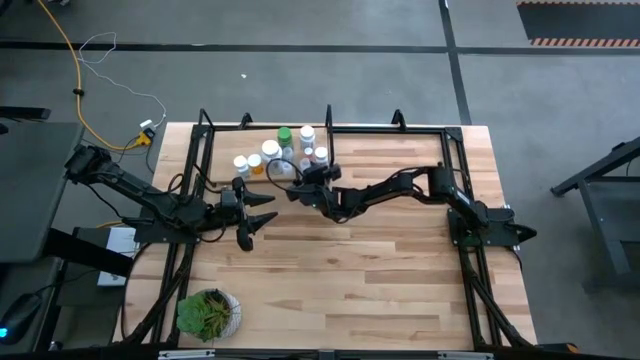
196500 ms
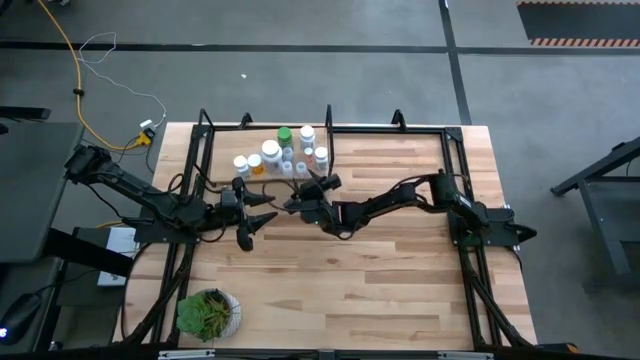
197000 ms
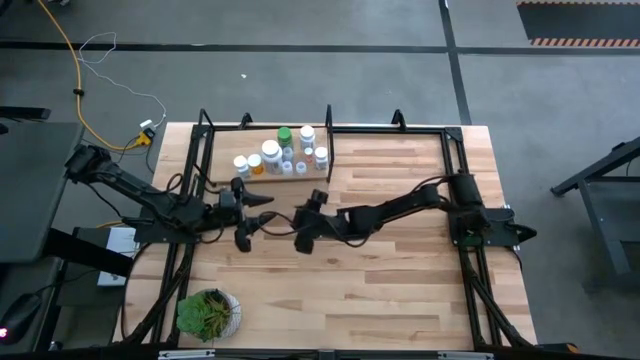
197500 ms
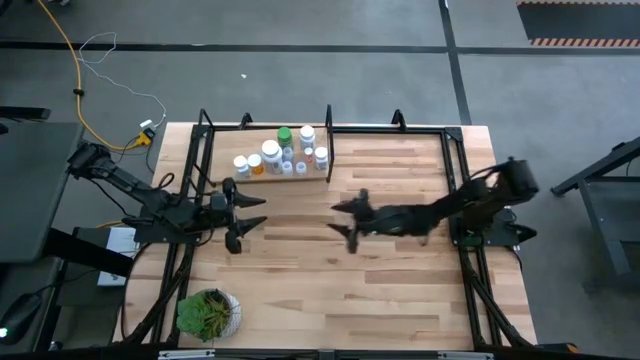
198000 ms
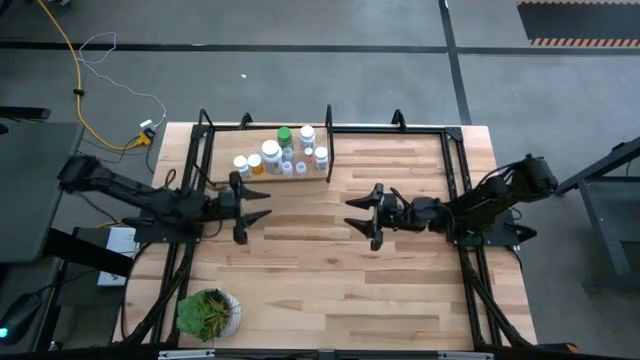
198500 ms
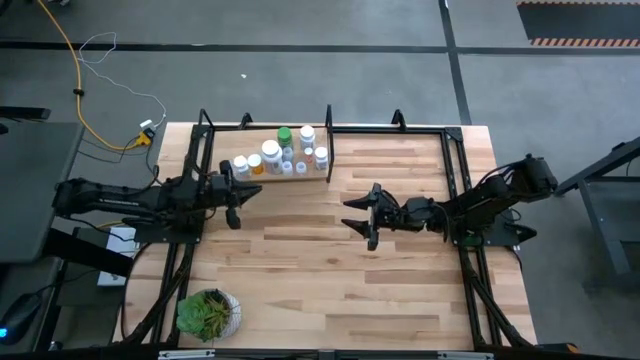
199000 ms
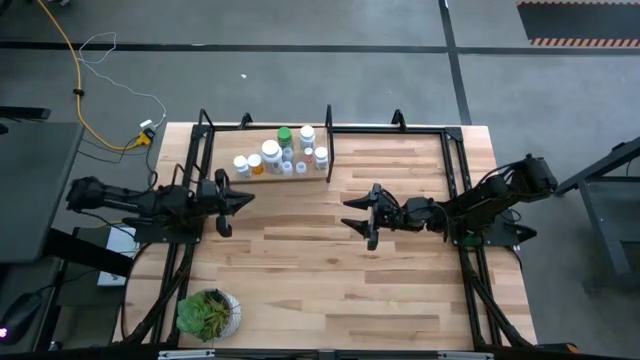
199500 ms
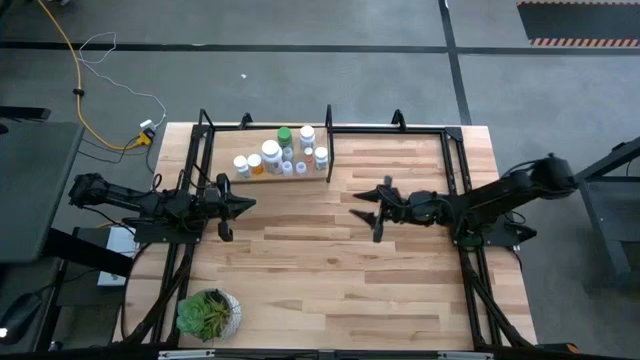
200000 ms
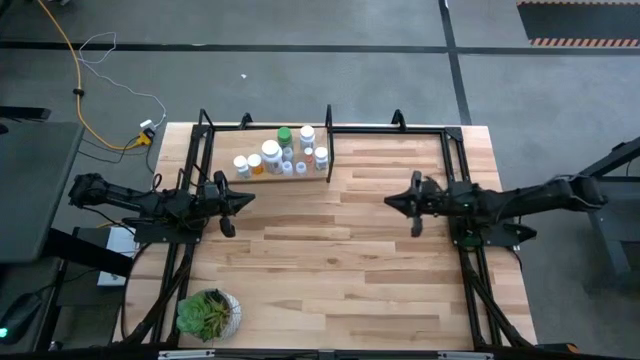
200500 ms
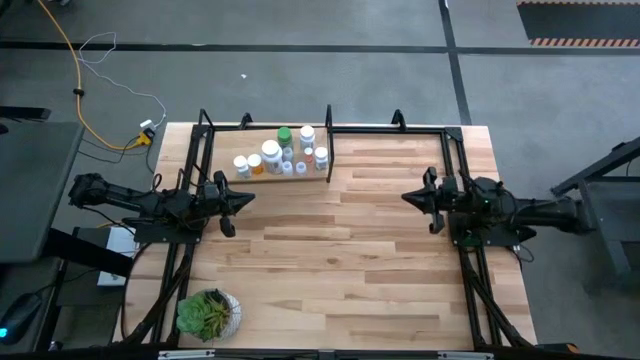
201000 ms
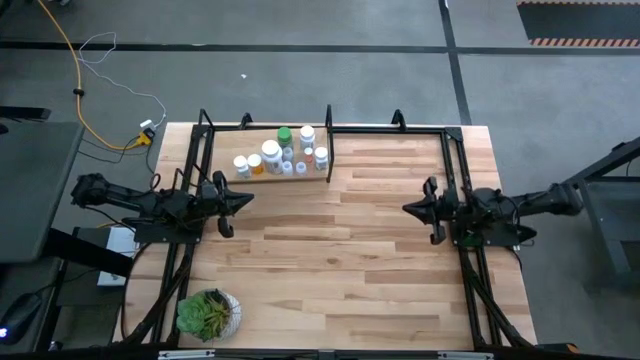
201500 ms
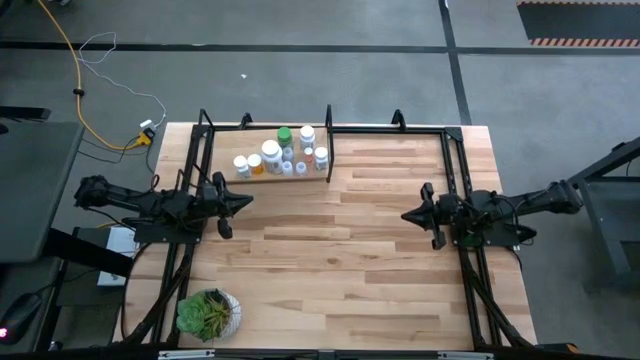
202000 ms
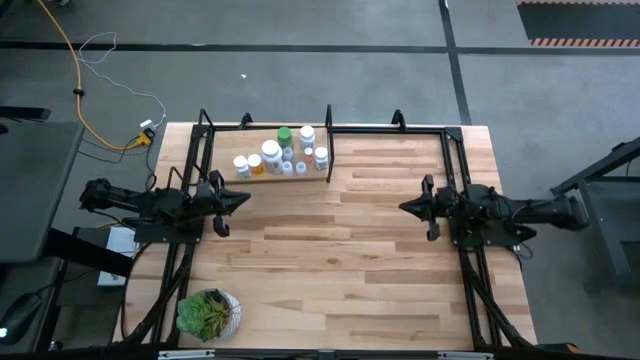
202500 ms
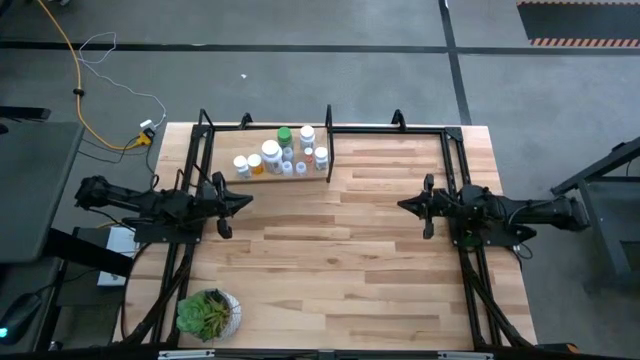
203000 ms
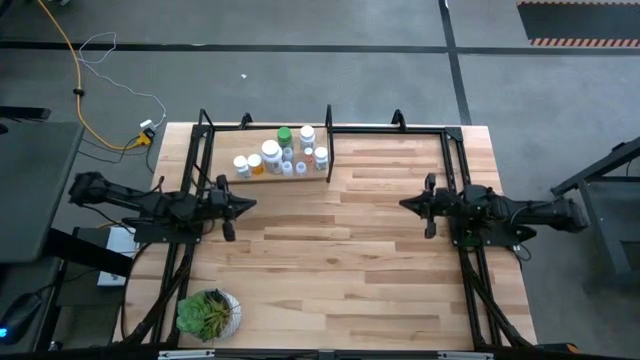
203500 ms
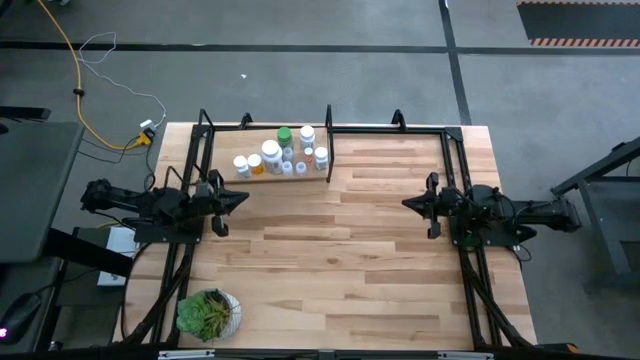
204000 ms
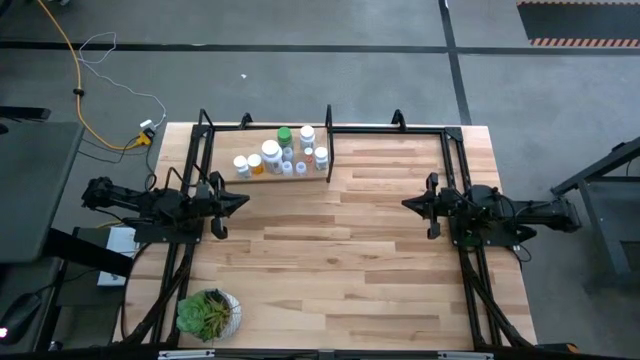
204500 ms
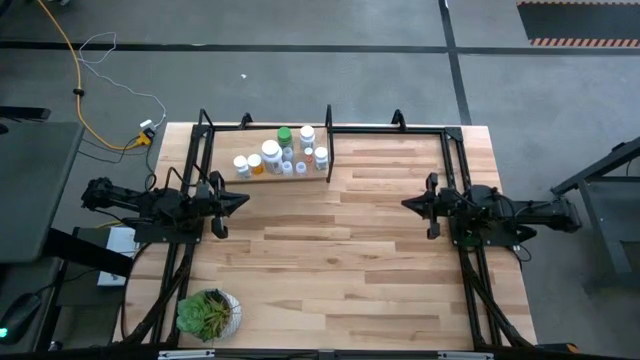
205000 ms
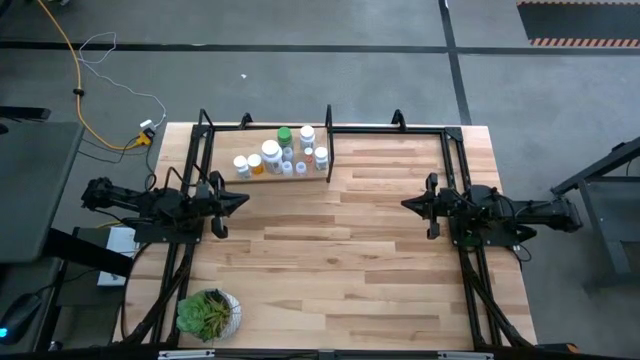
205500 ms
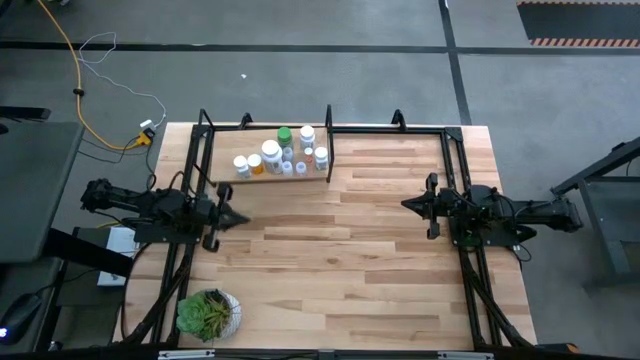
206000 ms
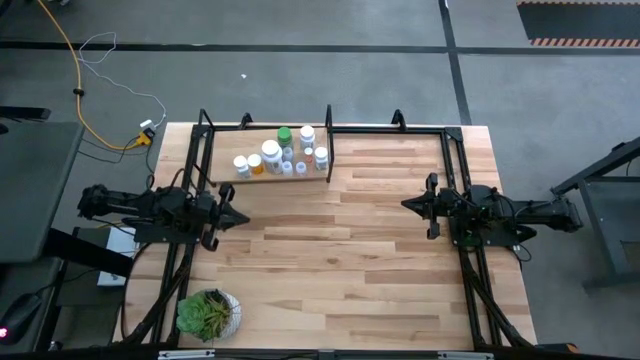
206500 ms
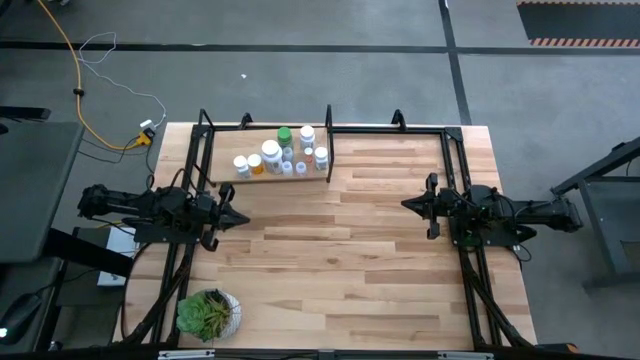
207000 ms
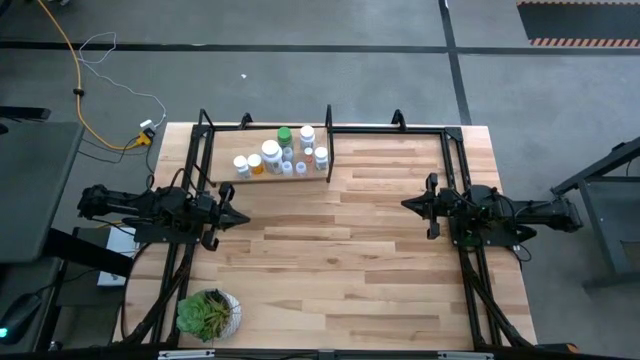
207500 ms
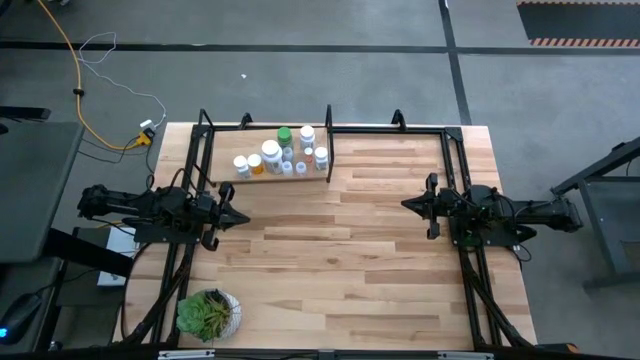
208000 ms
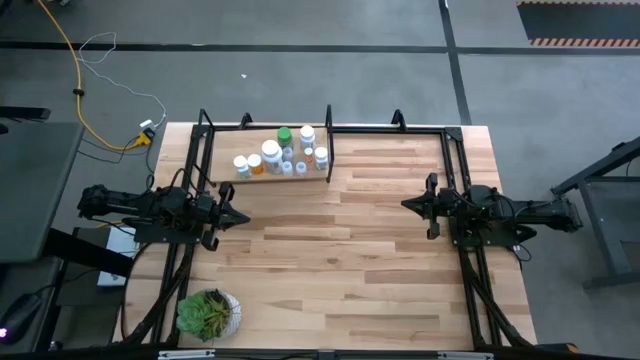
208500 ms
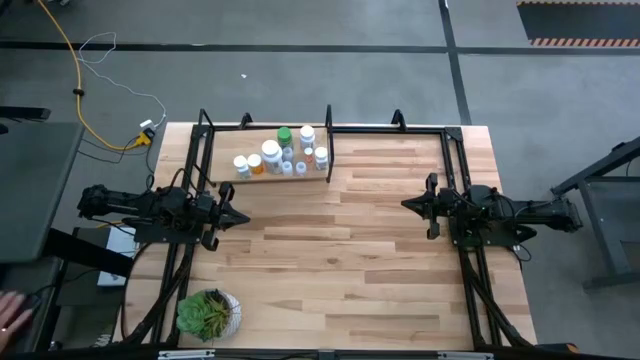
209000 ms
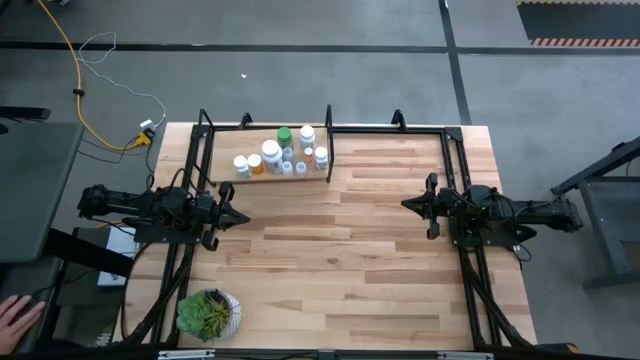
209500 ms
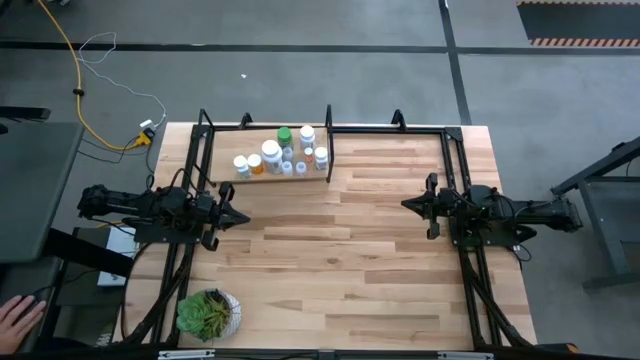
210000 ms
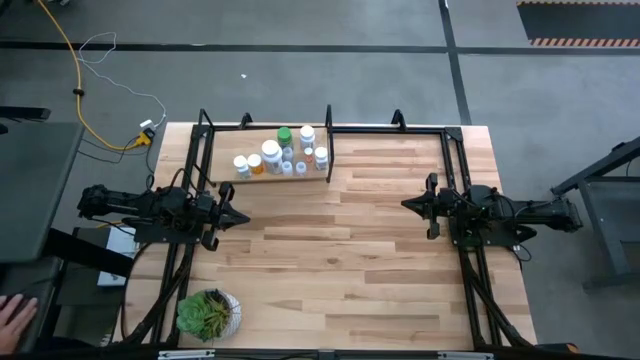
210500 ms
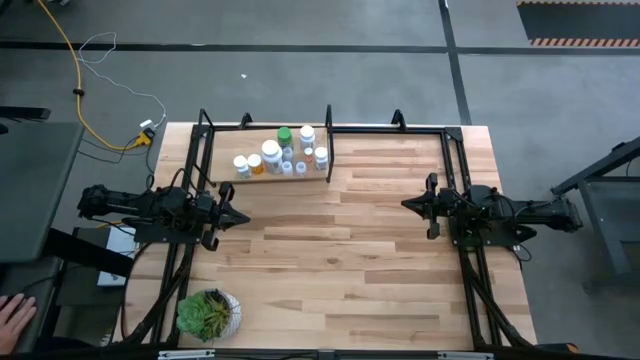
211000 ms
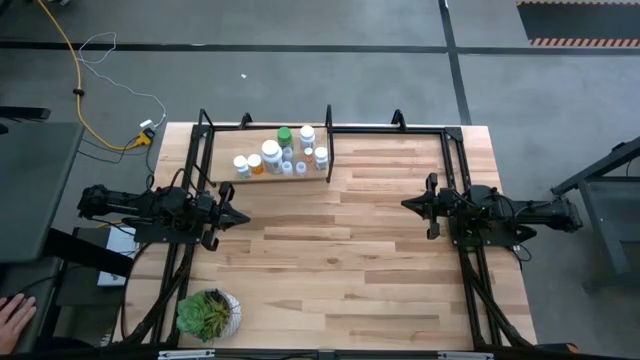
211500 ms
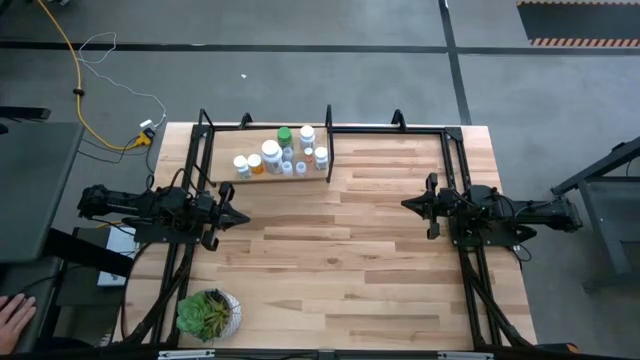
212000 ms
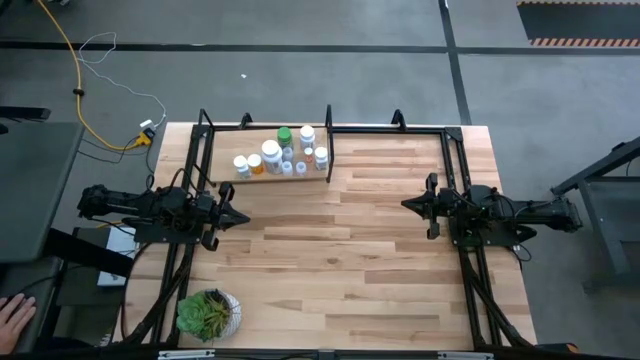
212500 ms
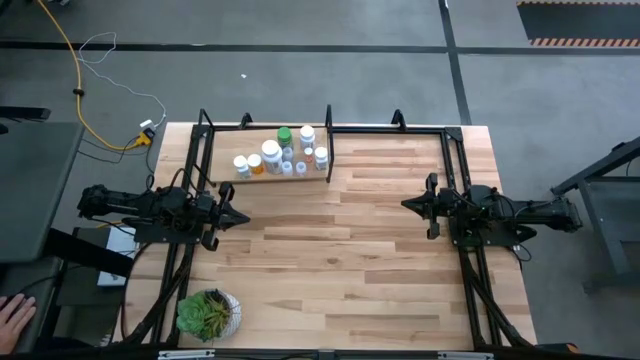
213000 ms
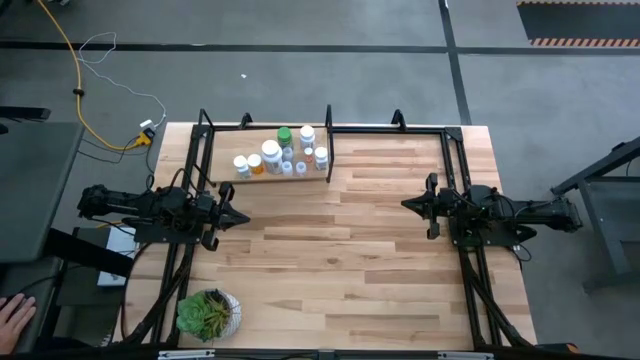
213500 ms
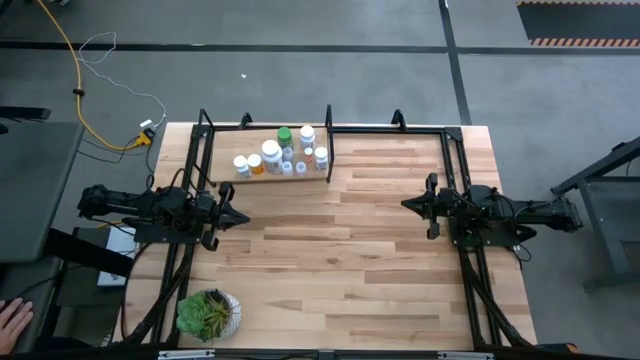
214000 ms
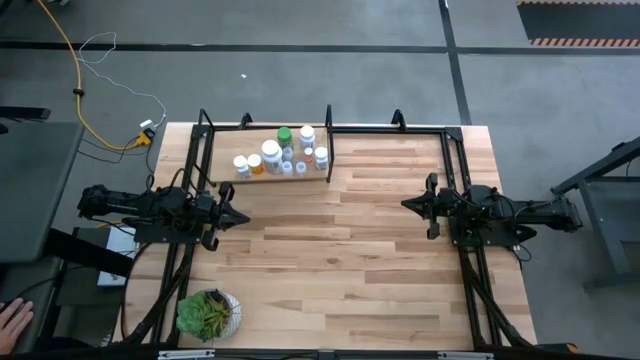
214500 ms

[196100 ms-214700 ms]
Task: Pick and place medicine bottles onto shelf by color
Return to Home Position

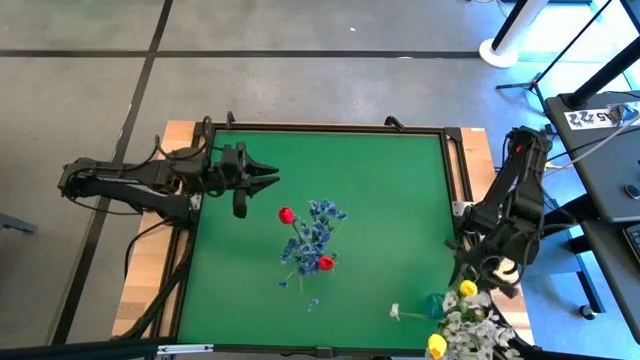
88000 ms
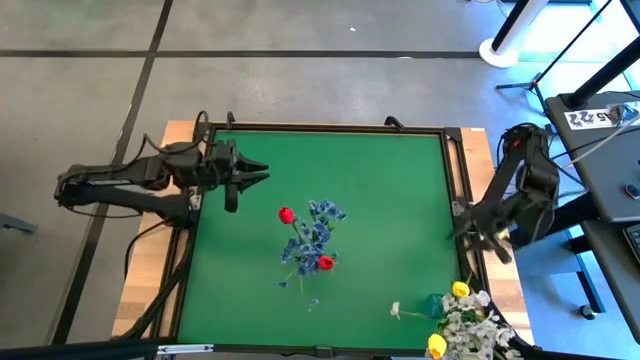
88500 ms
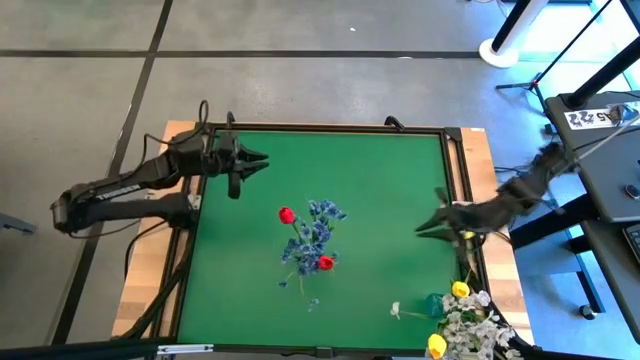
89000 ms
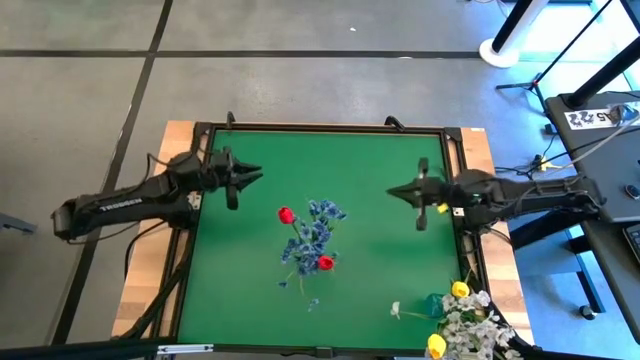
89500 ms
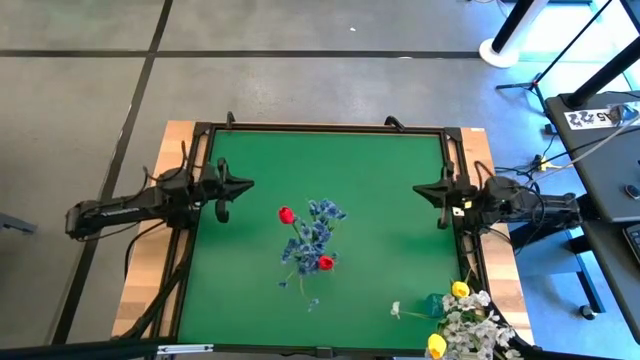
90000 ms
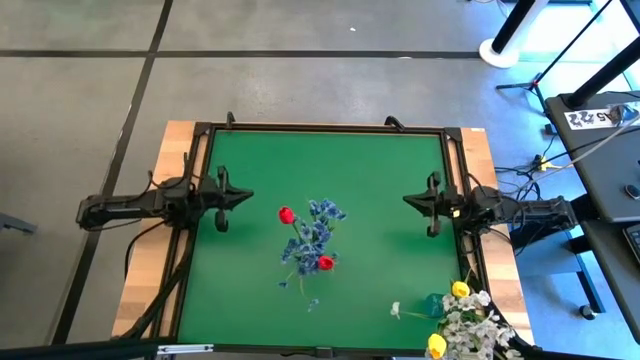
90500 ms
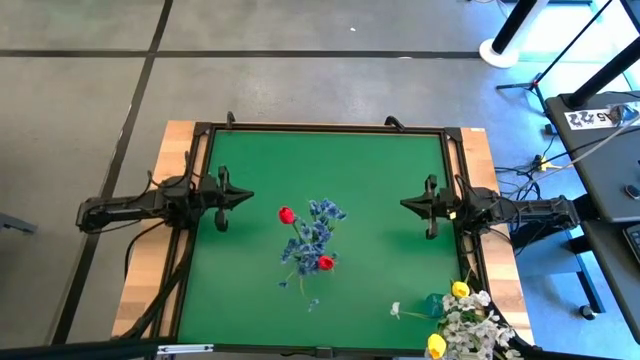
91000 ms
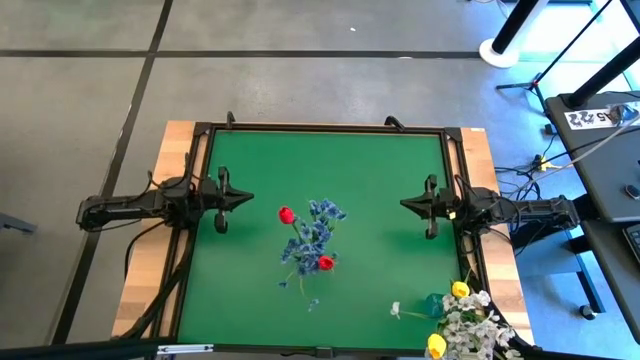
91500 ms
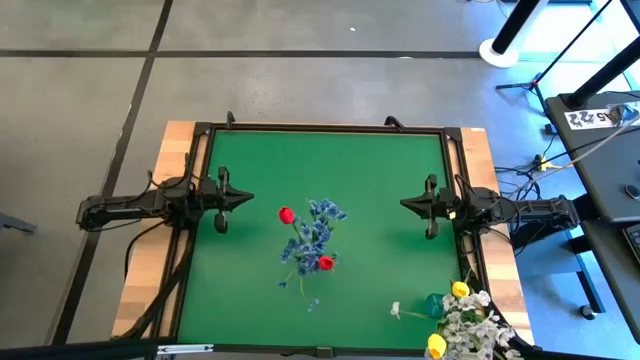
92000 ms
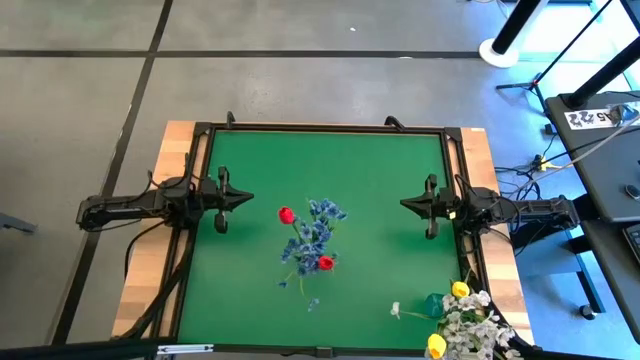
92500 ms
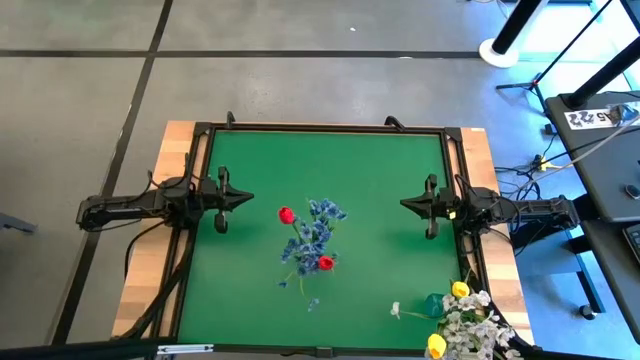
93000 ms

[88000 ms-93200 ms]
Task: Sort flowers into vase by color
Return to Home Position
